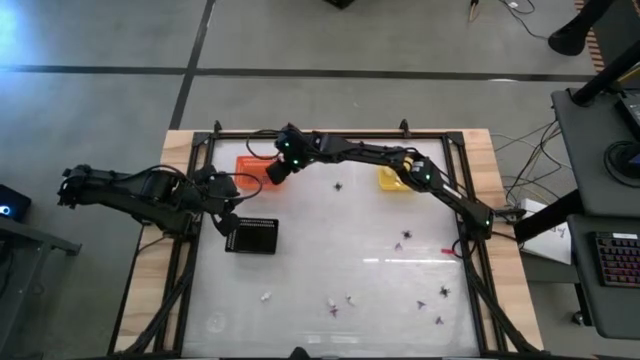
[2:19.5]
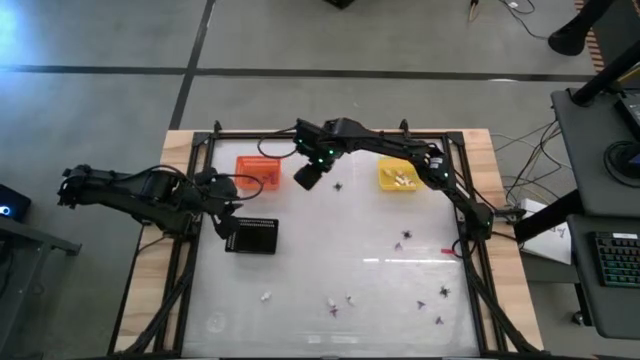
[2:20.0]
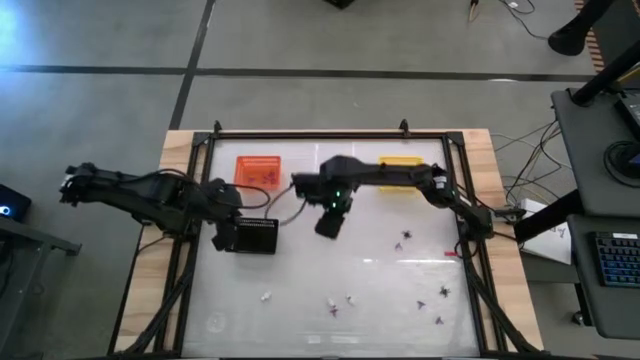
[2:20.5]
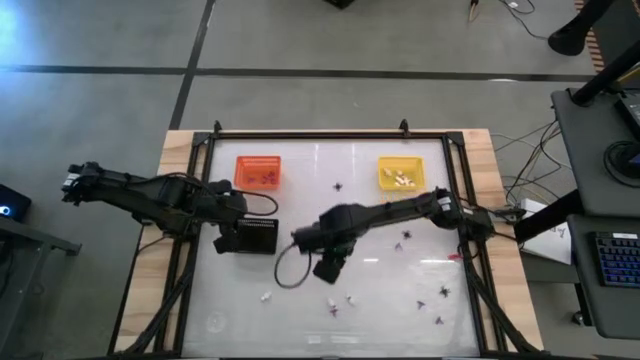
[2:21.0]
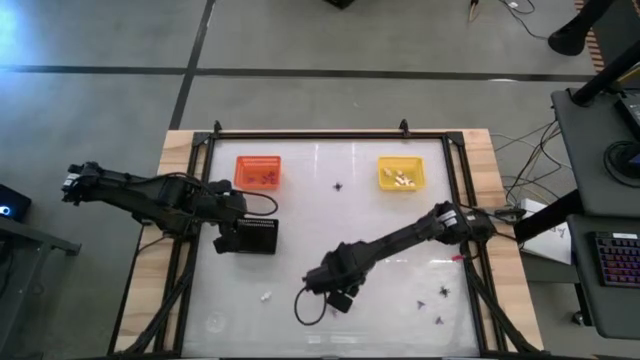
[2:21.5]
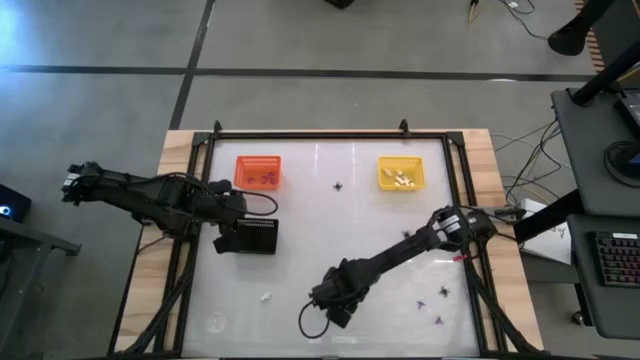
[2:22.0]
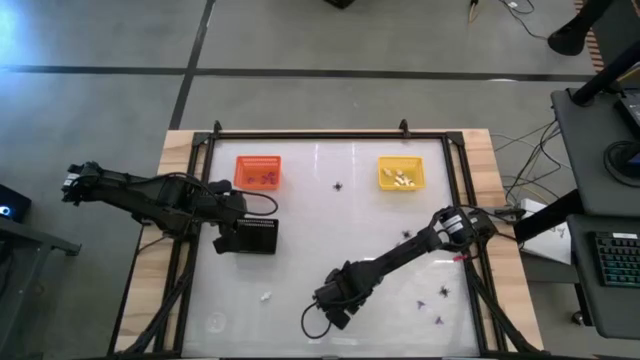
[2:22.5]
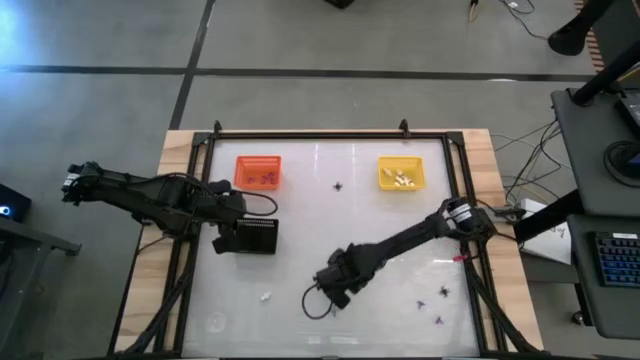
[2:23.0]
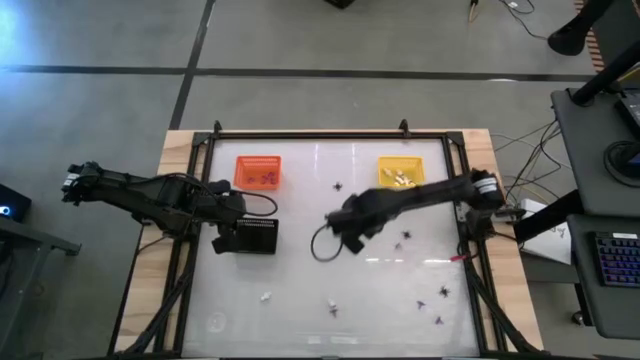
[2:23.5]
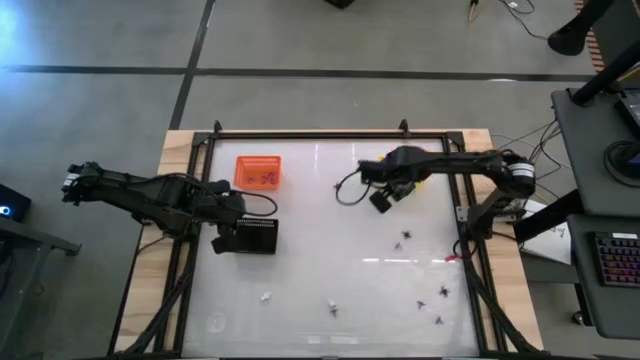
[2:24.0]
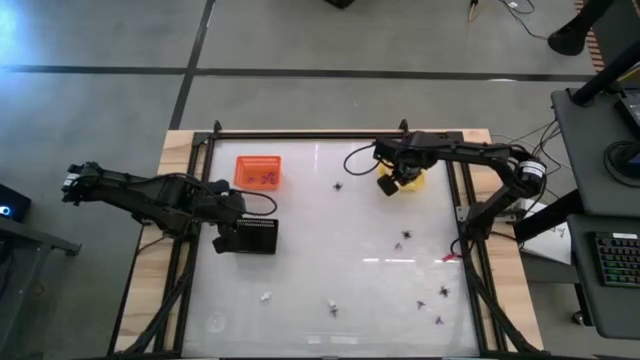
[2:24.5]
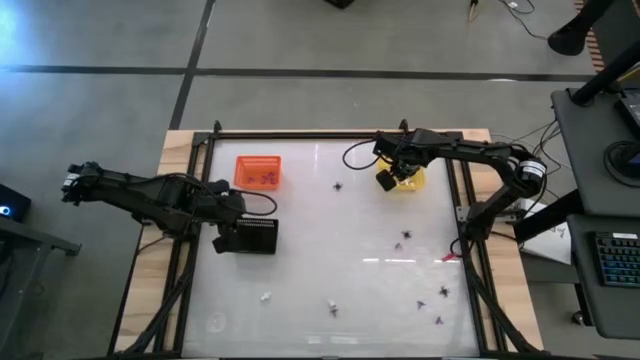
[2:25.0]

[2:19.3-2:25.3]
Task: Sort Halloween decoration
Put the white skeleton toy into the yellow bin

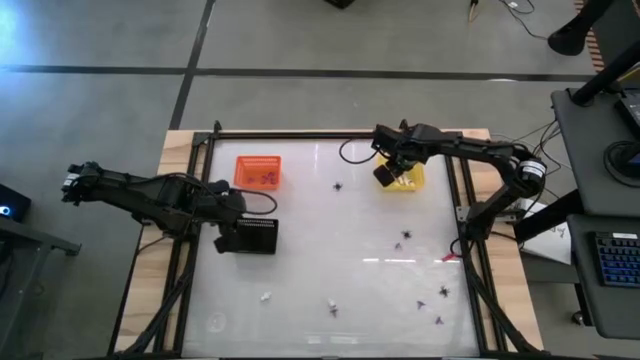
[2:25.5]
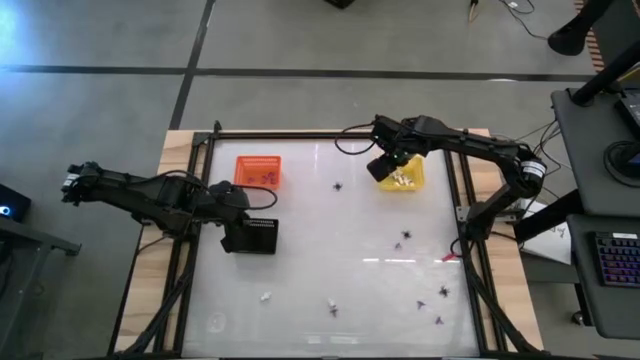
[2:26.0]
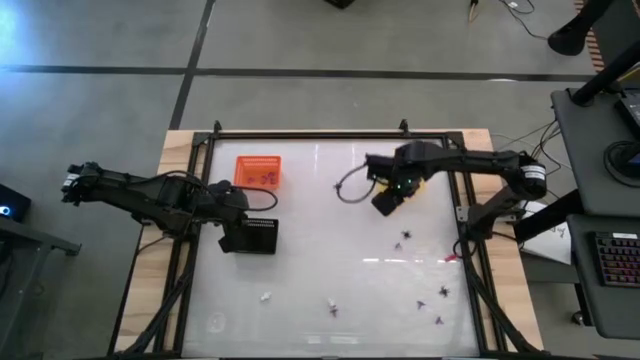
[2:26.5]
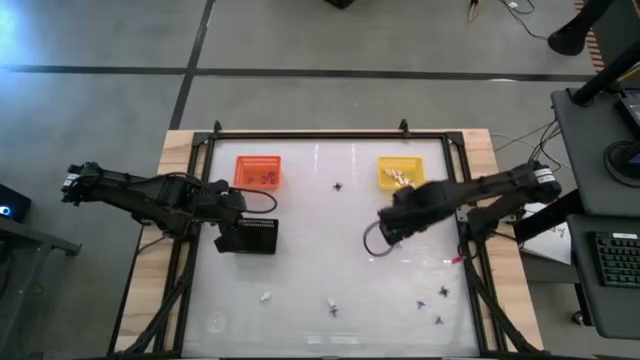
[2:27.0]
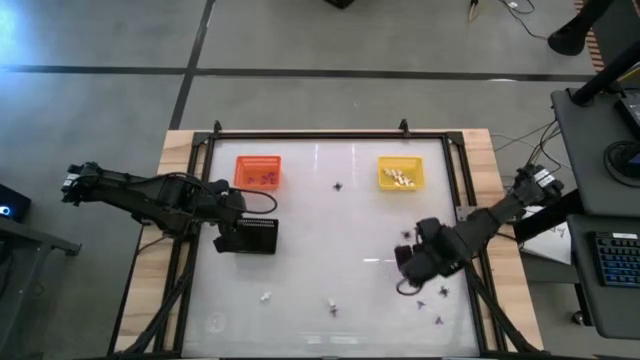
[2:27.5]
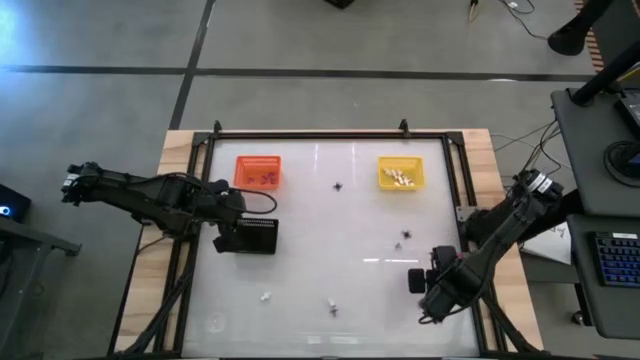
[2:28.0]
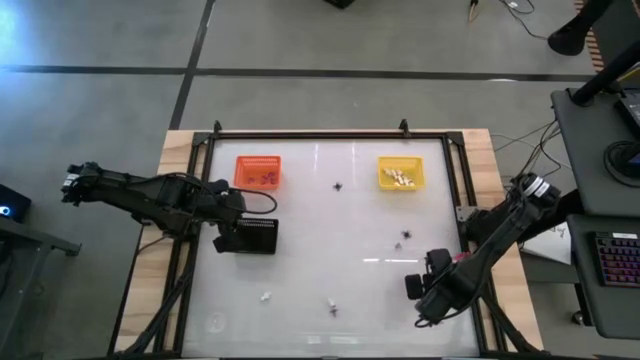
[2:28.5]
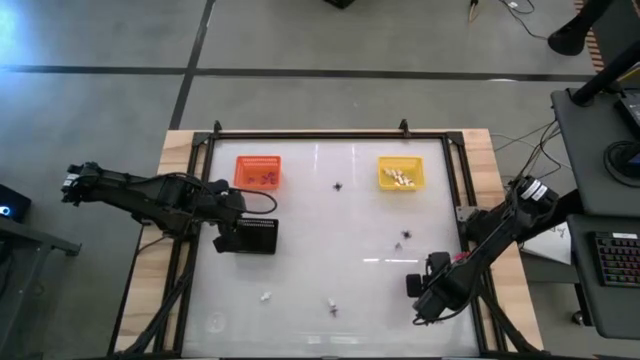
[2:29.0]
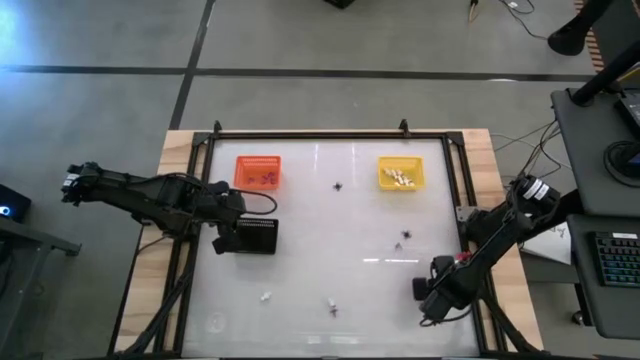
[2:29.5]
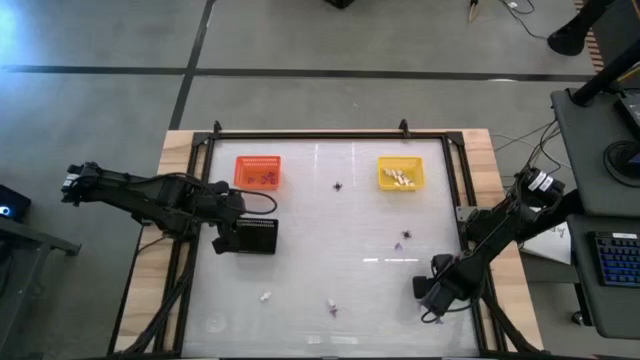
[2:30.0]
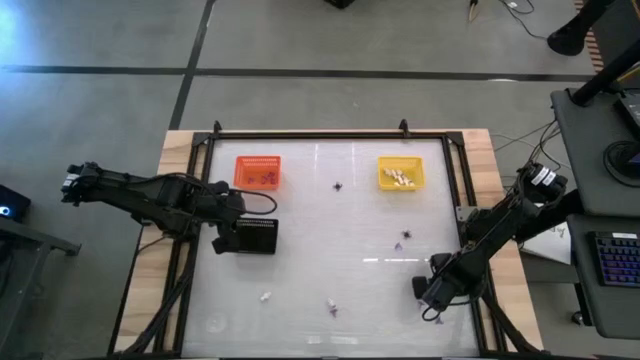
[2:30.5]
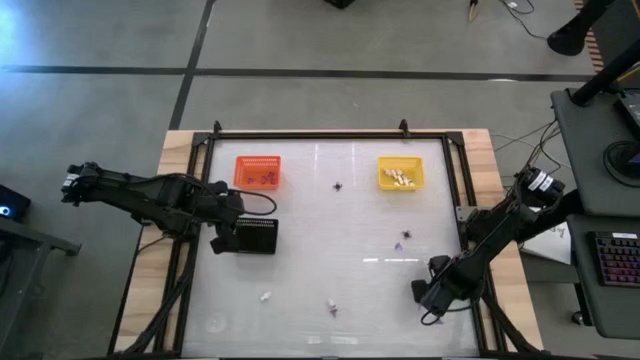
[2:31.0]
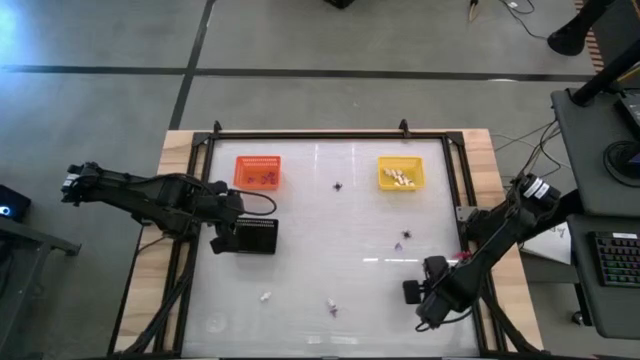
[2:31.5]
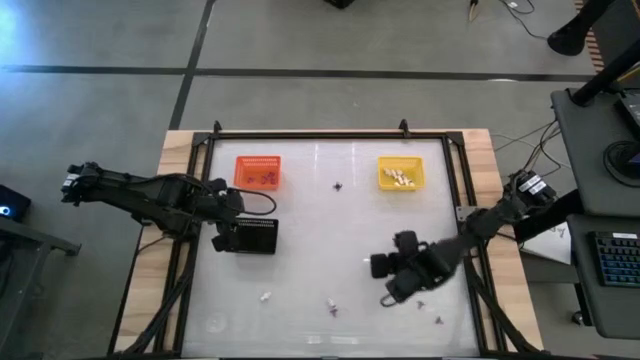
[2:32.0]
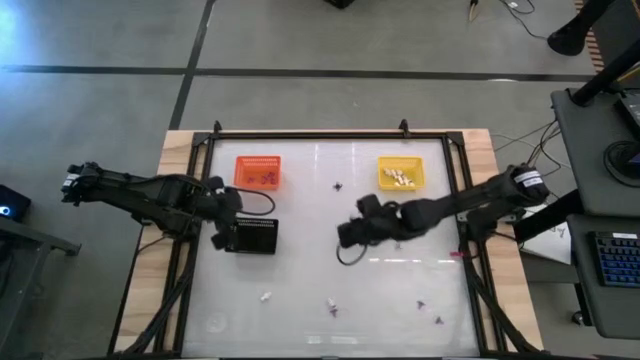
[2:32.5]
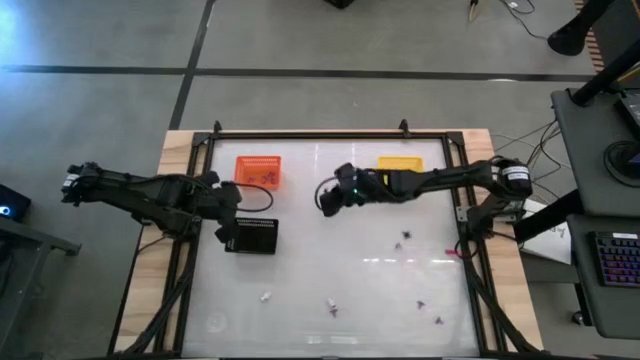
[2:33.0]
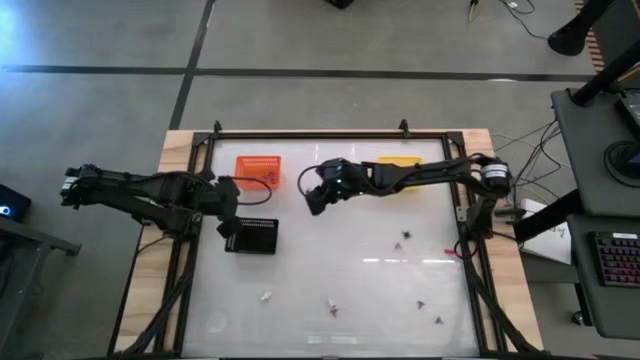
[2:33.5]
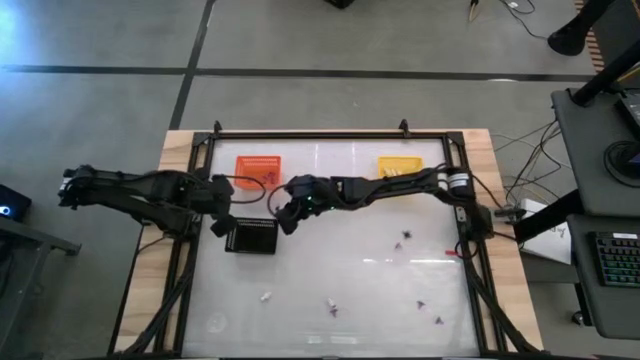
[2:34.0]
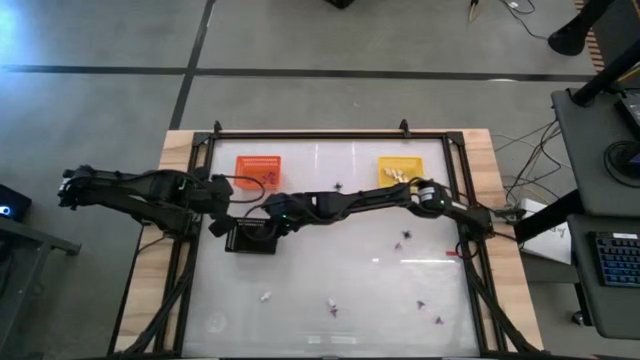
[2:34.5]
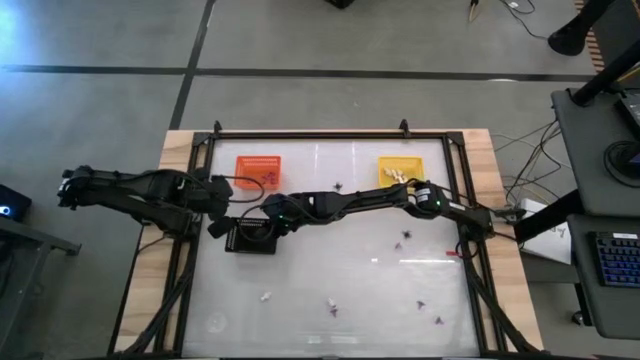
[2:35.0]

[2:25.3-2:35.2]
Put the black spider toy into the black bin

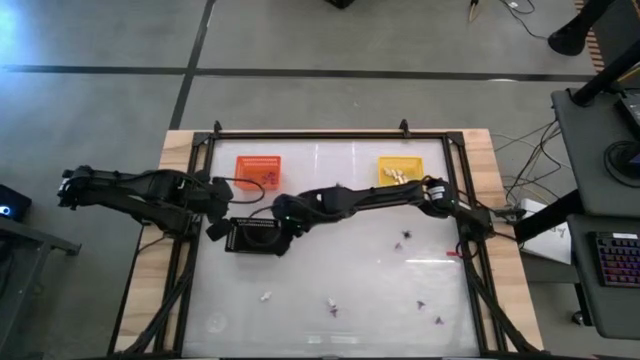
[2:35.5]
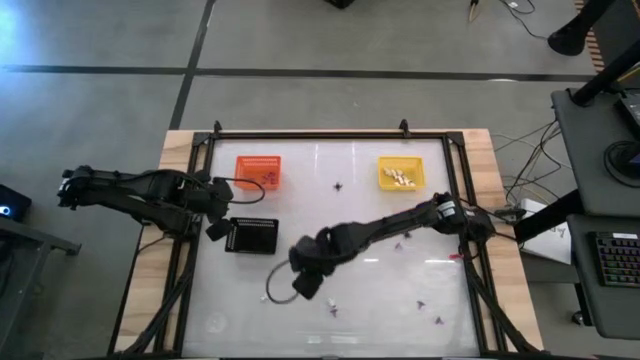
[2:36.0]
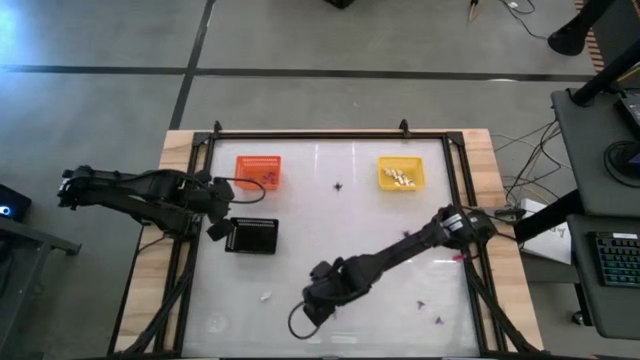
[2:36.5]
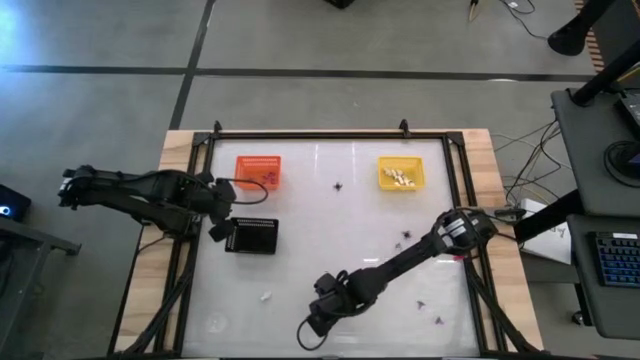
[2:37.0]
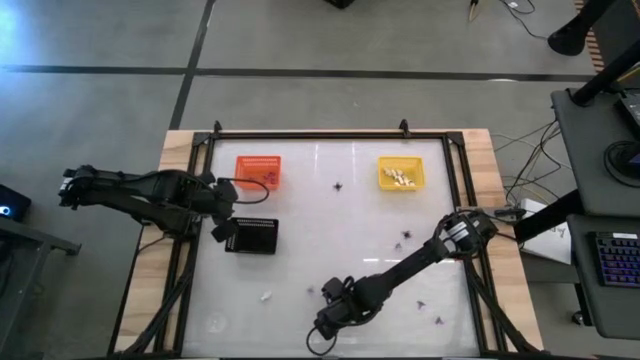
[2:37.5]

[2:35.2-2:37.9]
Put the violet witch hat toy into the orange bin

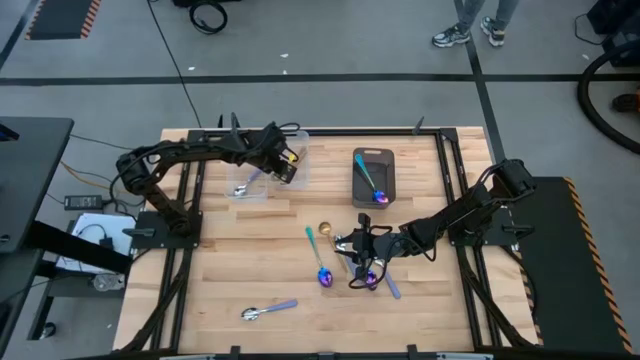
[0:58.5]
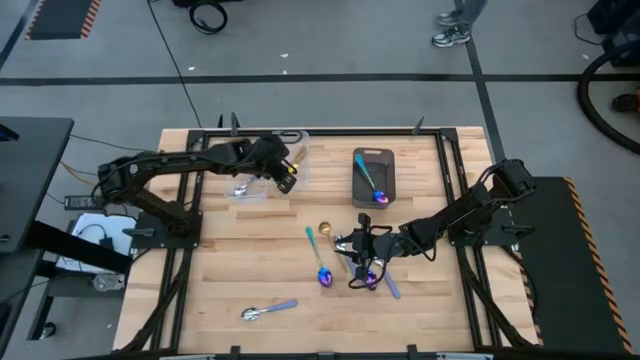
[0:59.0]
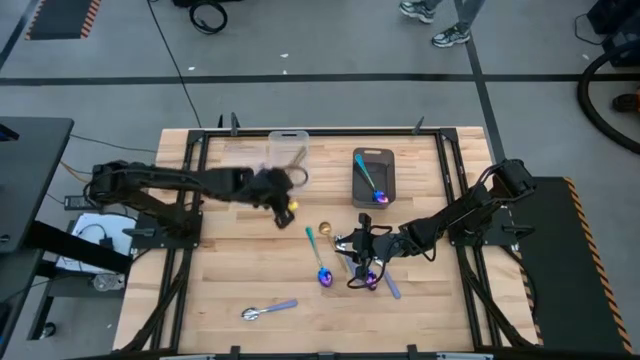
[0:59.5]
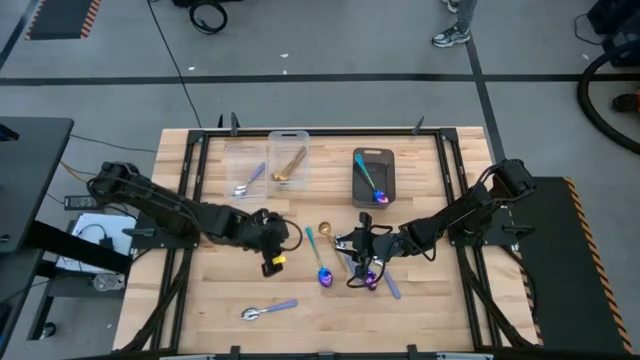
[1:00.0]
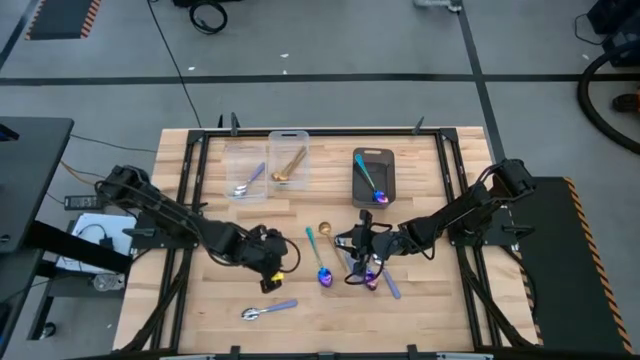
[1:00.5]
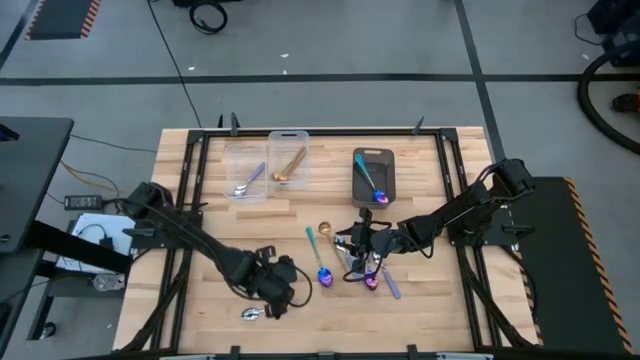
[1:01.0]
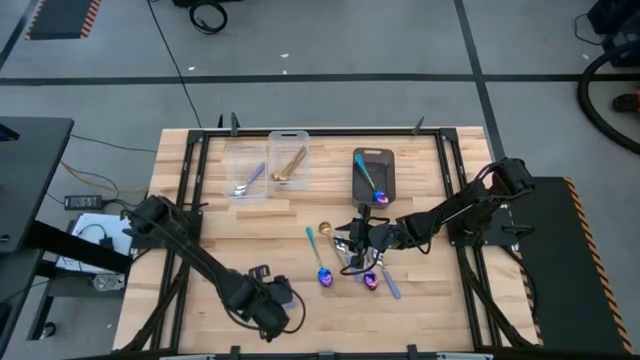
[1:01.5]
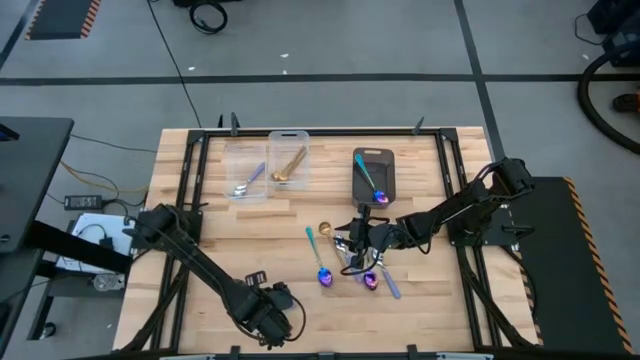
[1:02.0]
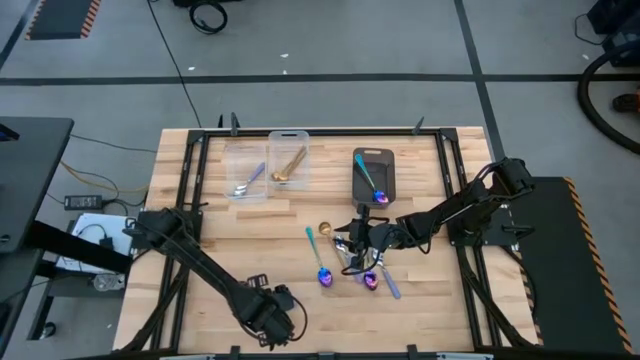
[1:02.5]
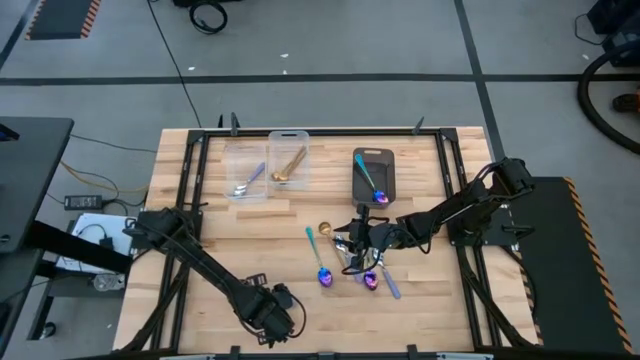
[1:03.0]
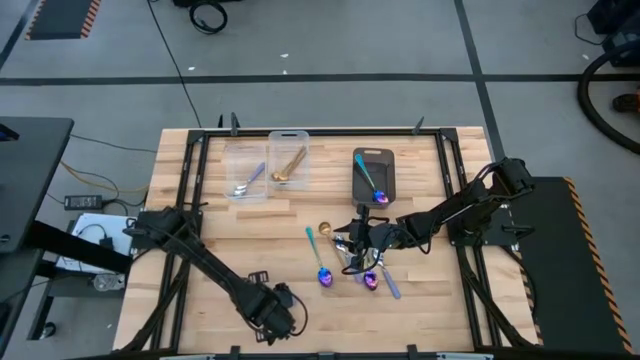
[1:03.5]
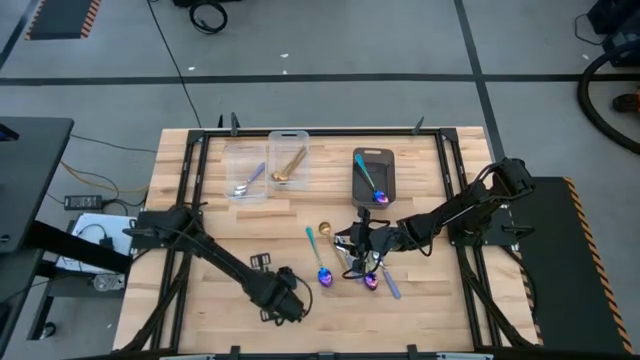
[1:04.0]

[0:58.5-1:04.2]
Task: Sort silverware by color (type)
Put the purple spoon into the left transparent bin
